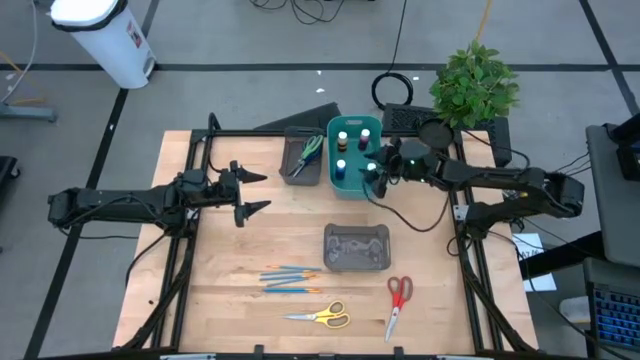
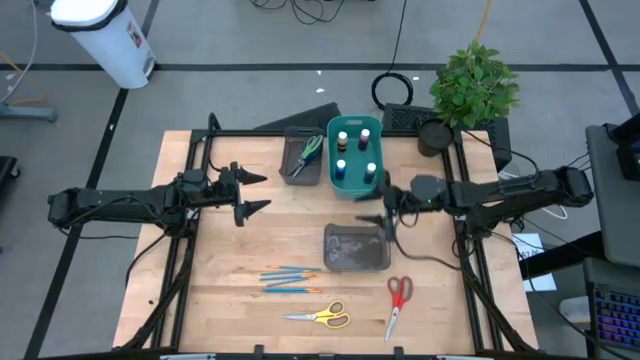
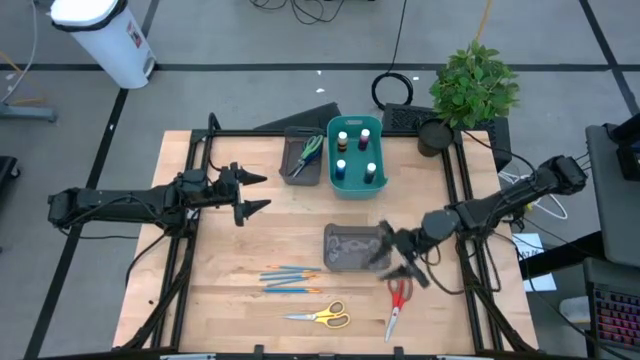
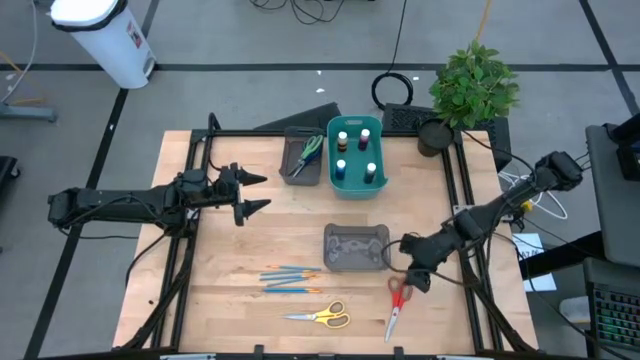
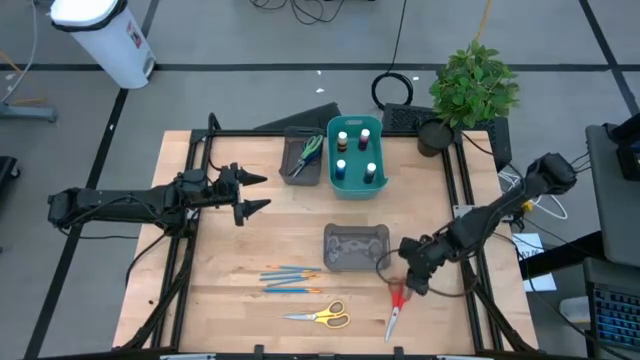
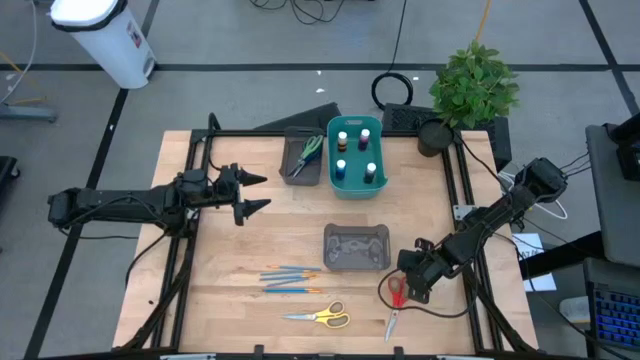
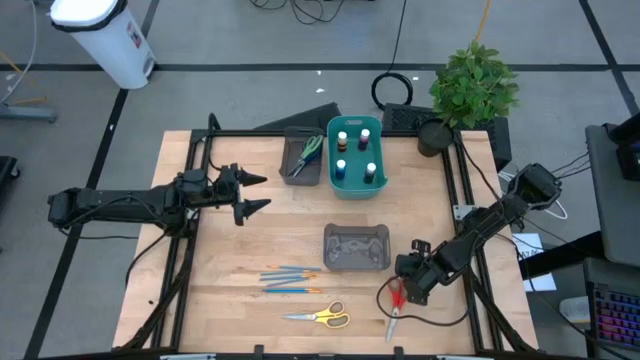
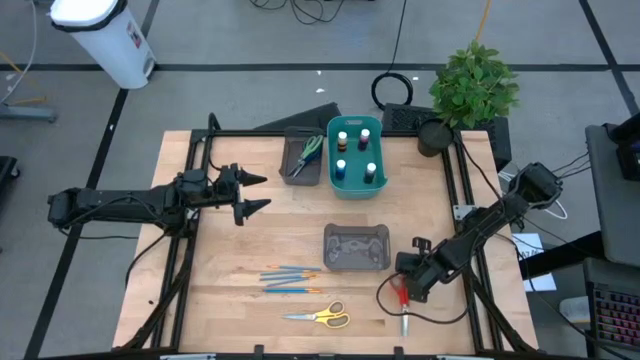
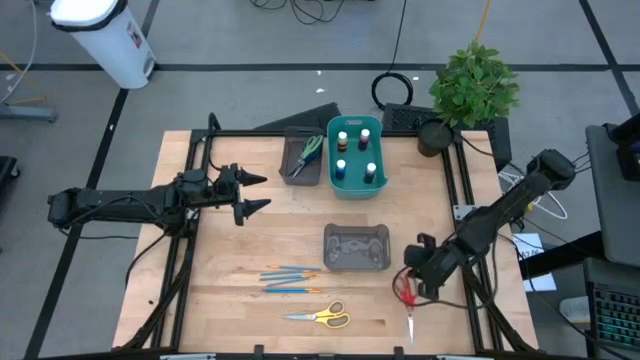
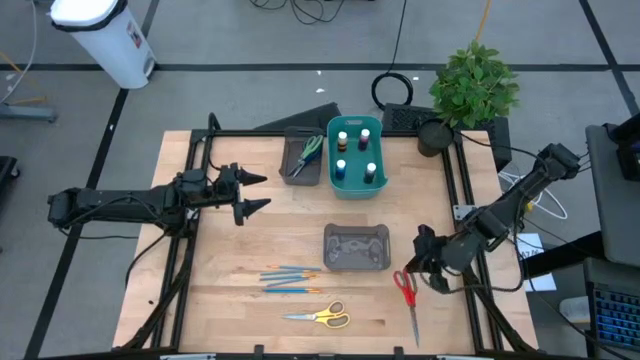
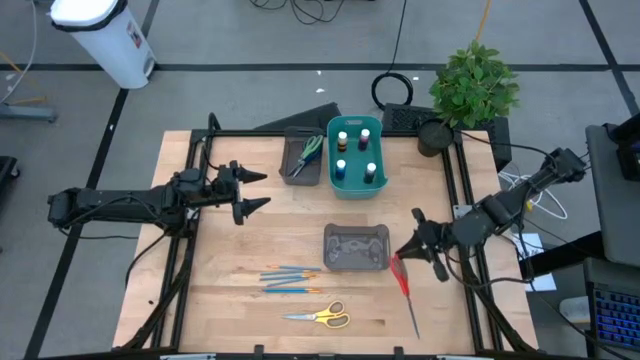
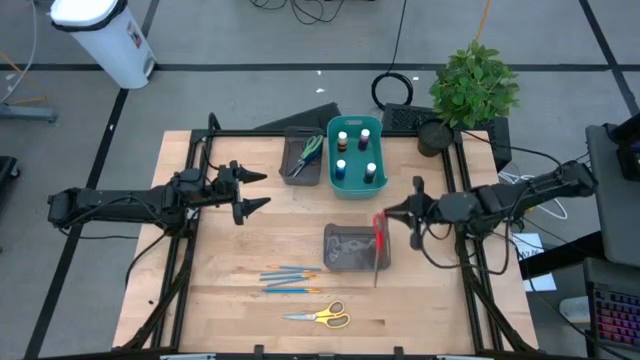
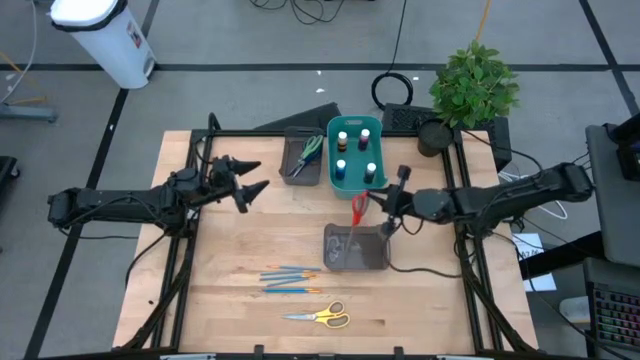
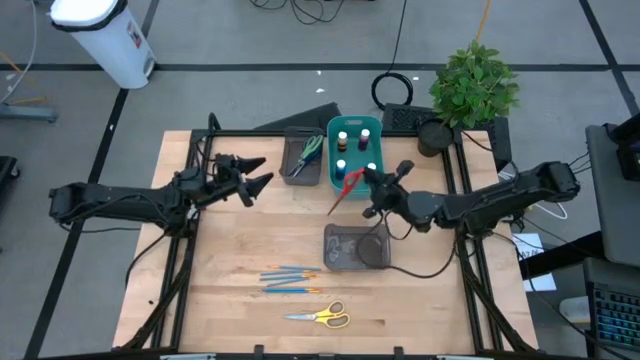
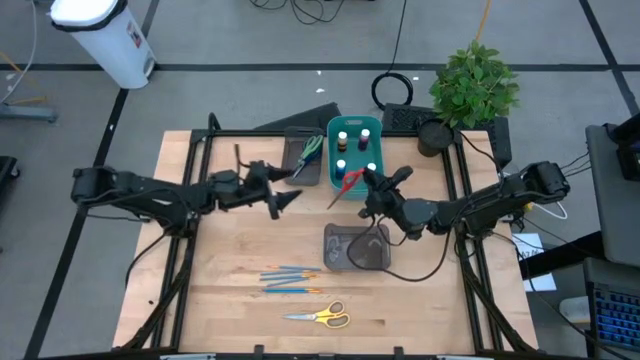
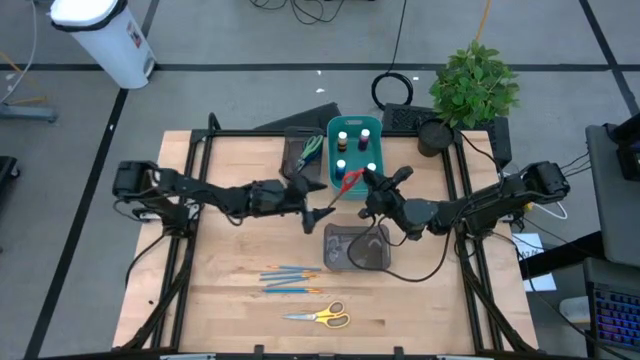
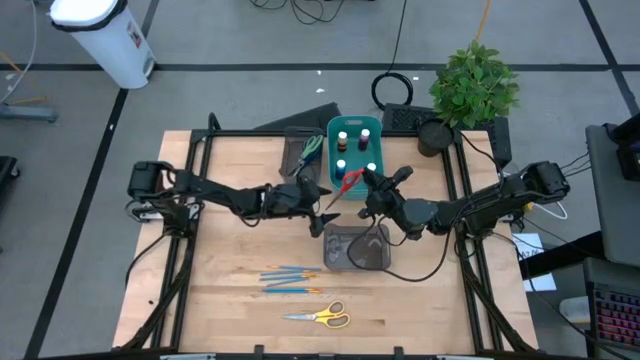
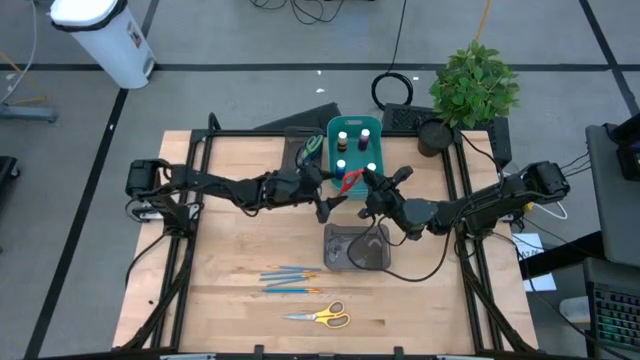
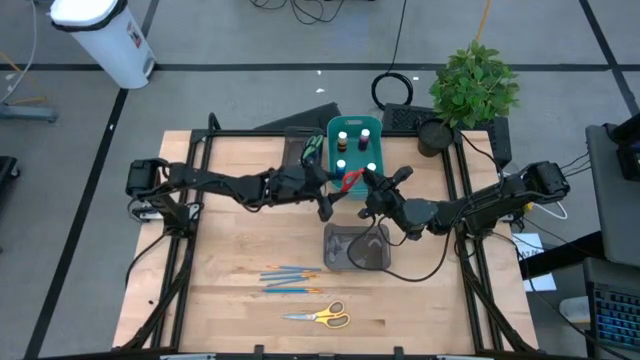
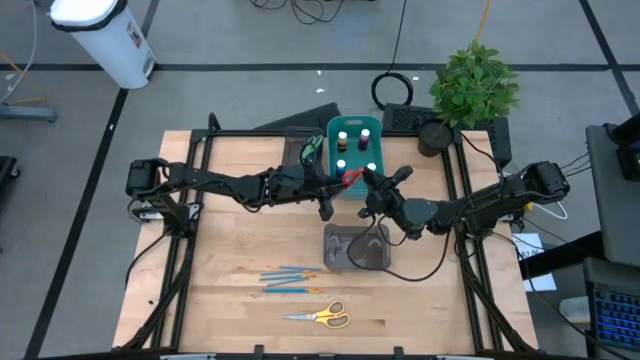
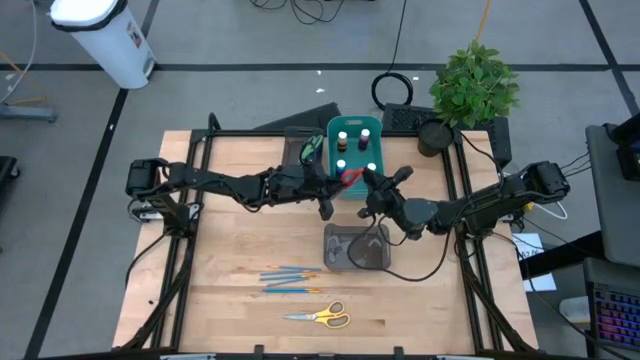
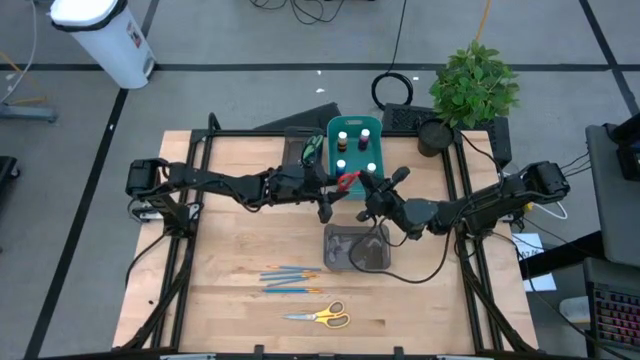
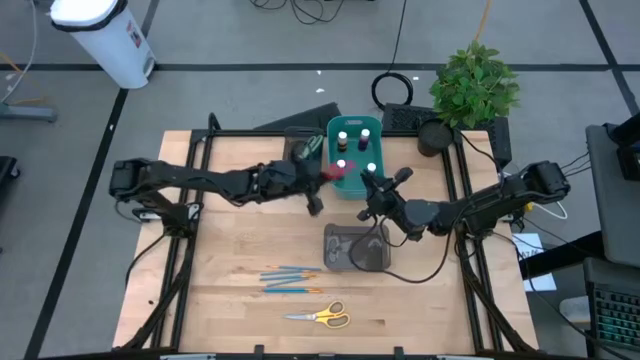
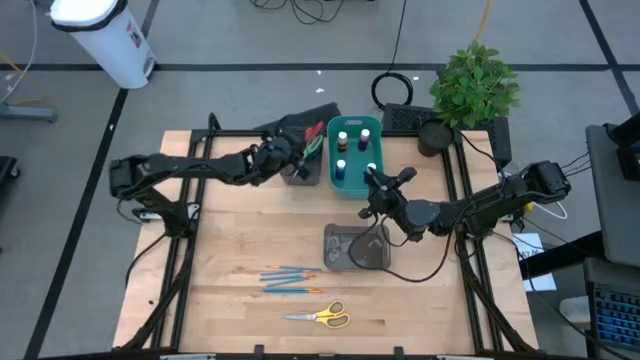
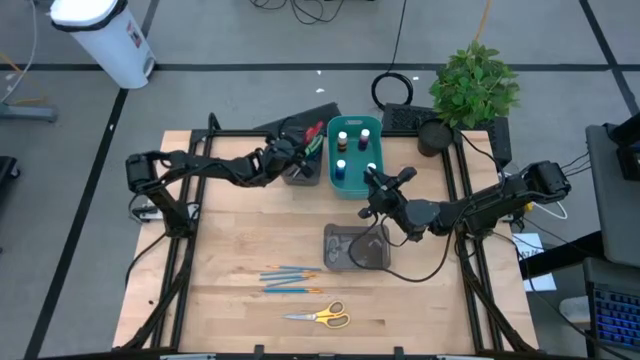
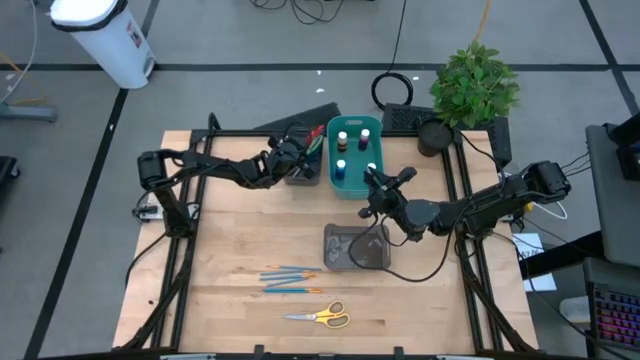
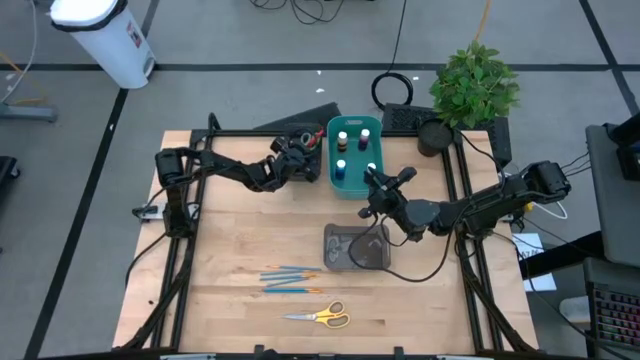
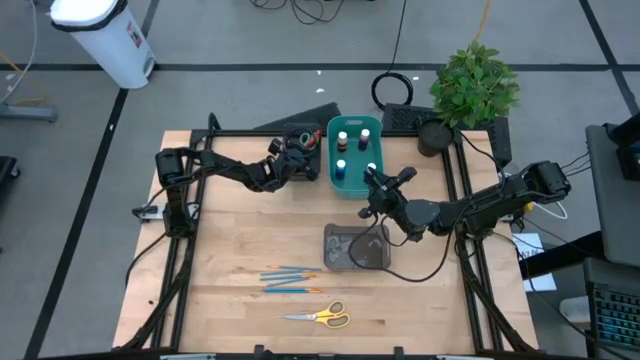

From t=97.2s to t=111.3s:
Task: Pick & Place Paint Supplies
Put the red scissors into the top black bin

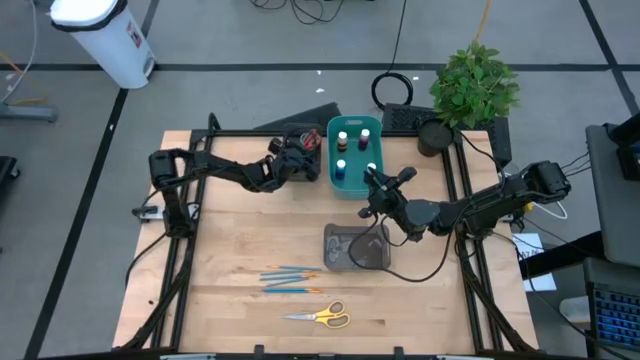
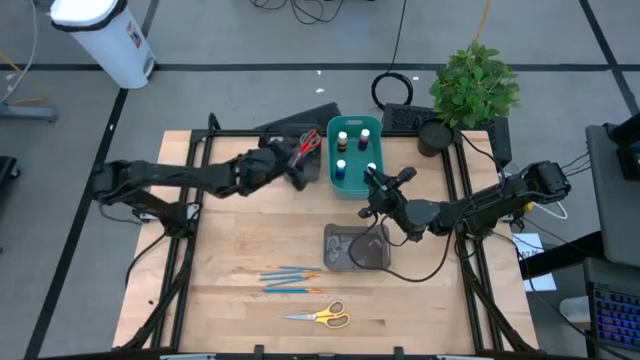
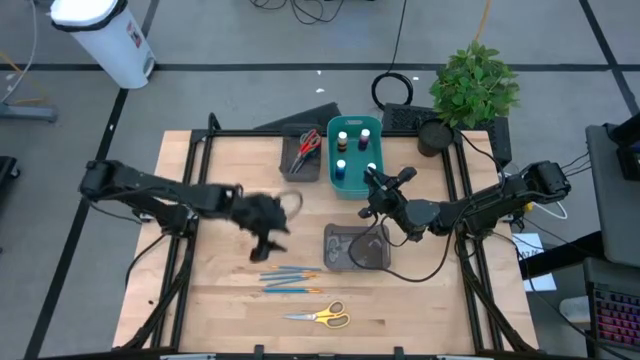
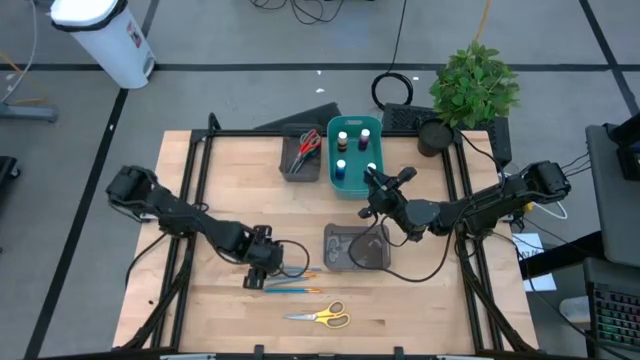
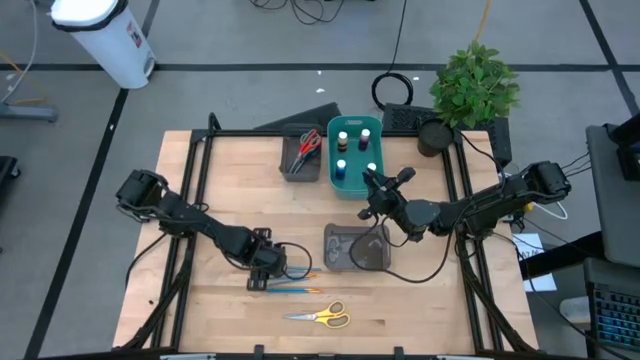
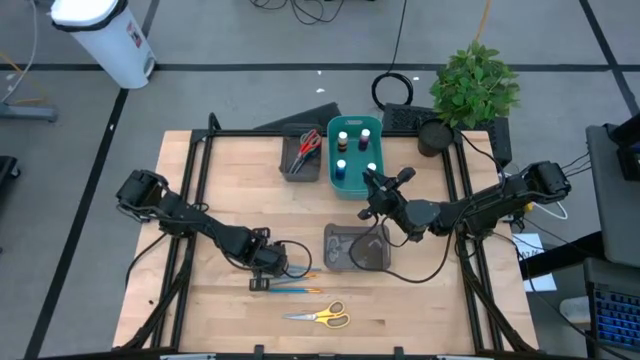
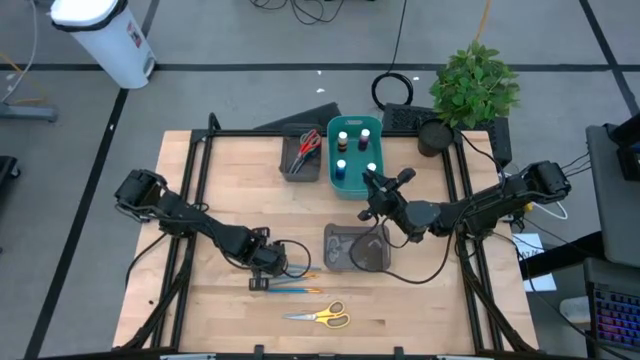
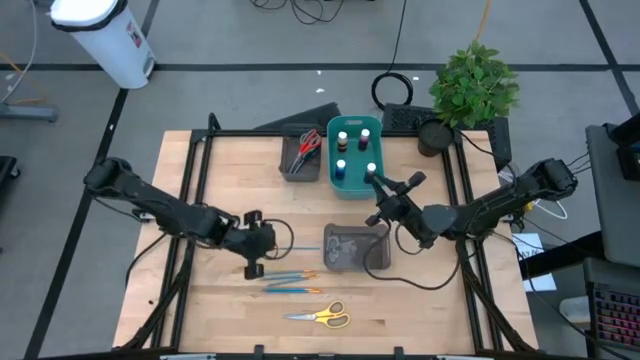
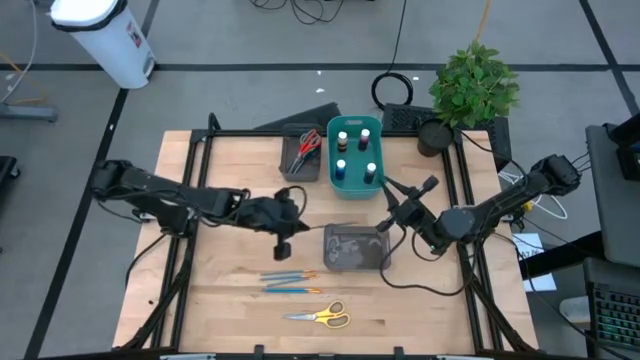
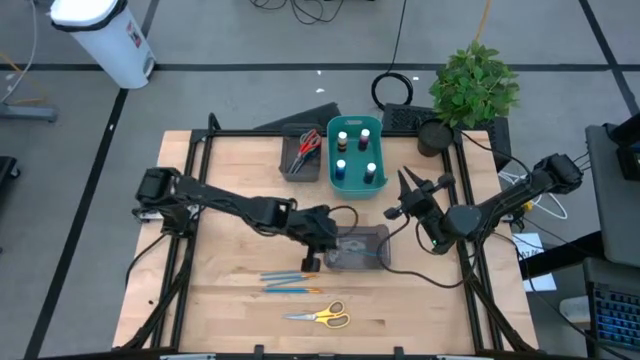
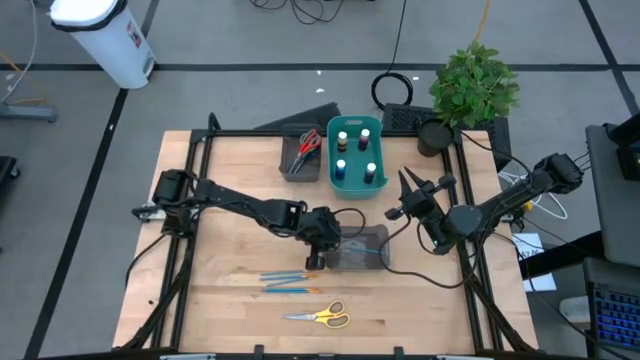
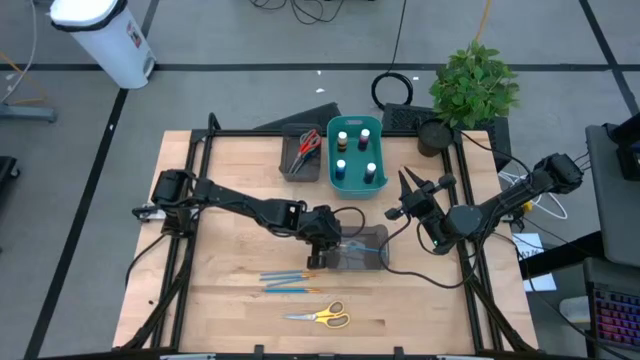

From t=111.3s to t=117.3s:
Put the blue paint brush into the bottom black bin

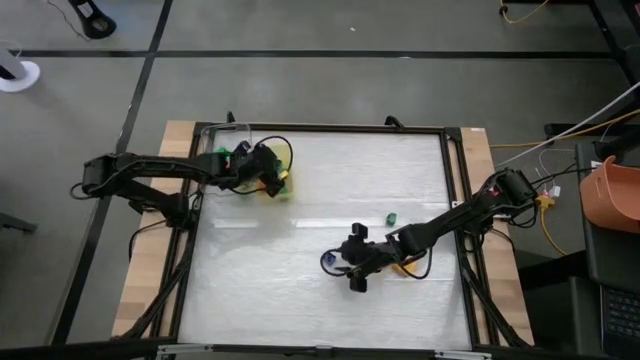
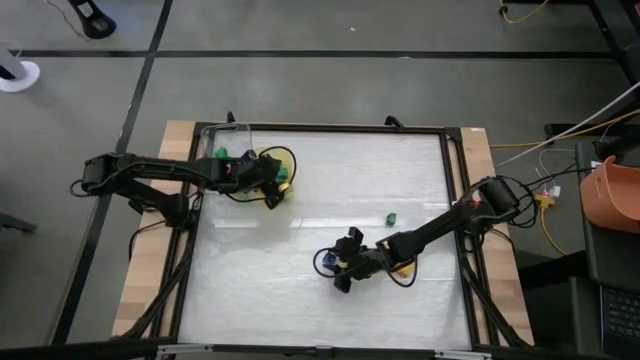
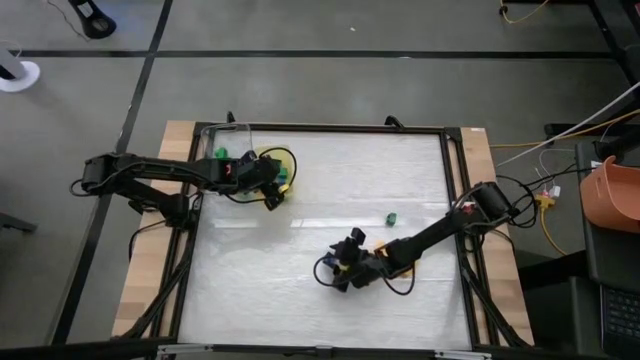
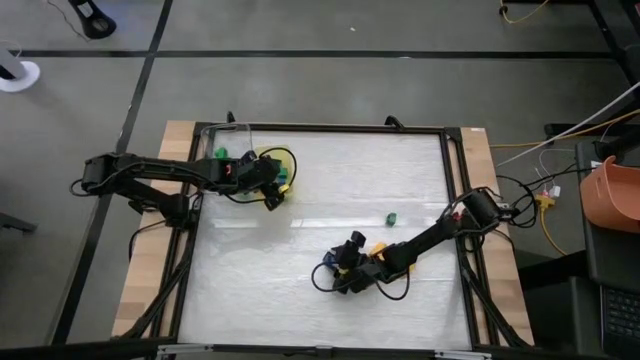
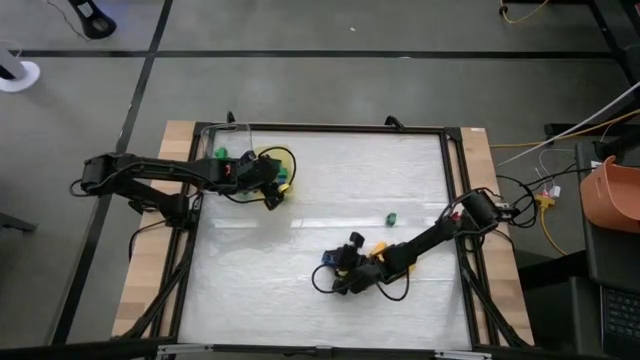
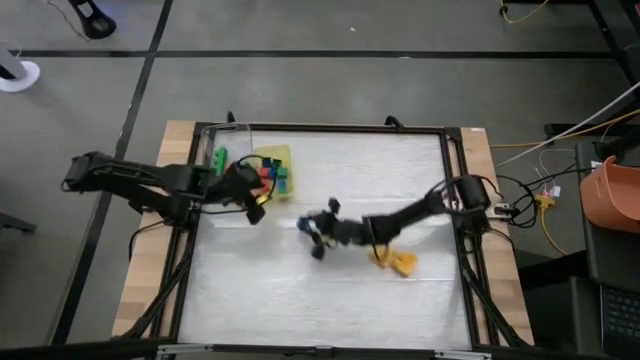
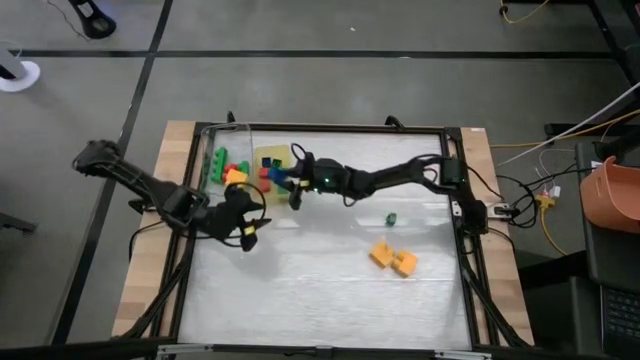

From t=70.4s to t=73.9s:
Task: Sort blocks by size
Put the small blue game piece into the yellow bin
